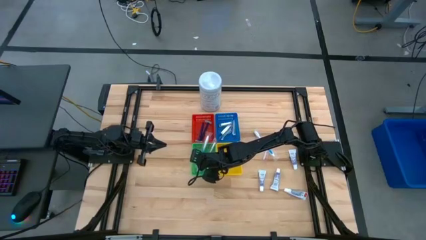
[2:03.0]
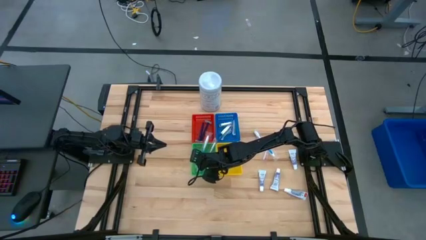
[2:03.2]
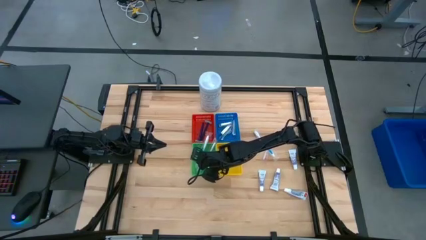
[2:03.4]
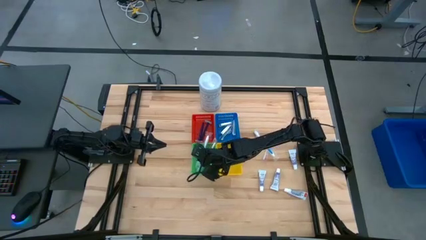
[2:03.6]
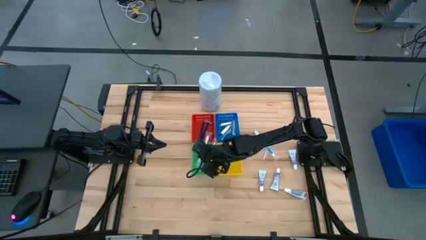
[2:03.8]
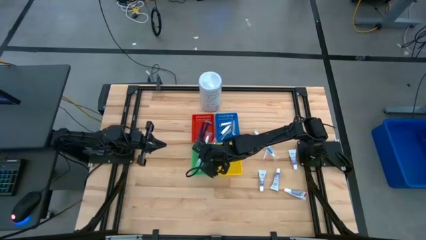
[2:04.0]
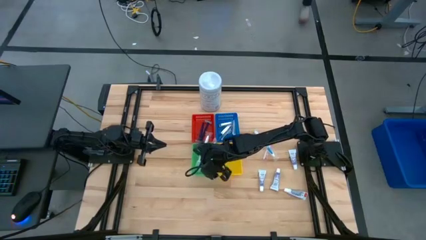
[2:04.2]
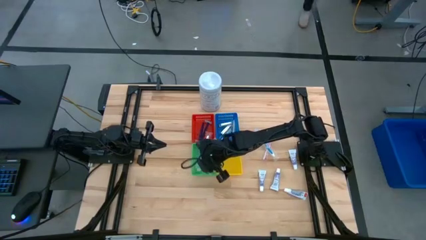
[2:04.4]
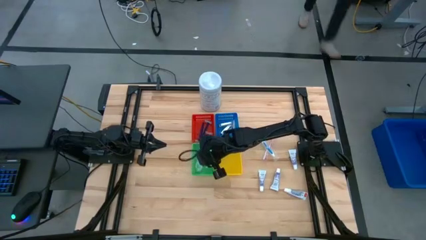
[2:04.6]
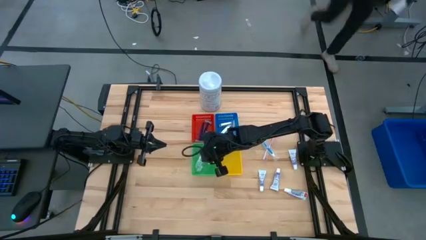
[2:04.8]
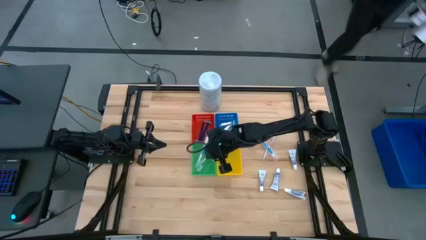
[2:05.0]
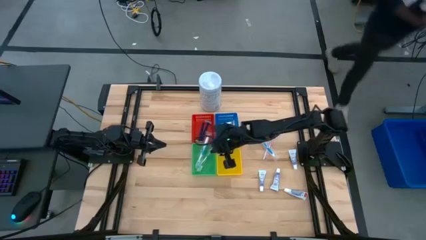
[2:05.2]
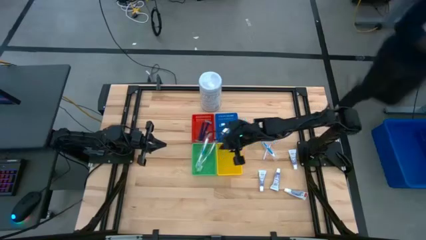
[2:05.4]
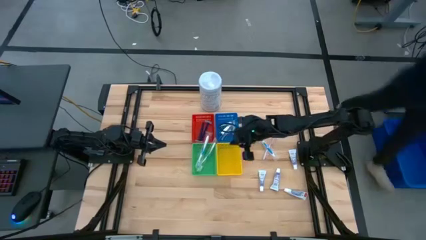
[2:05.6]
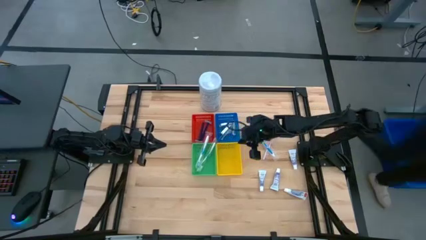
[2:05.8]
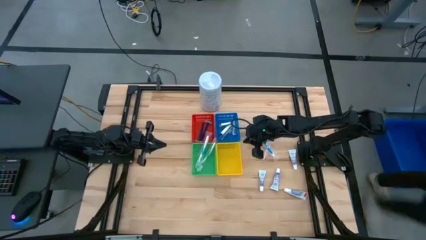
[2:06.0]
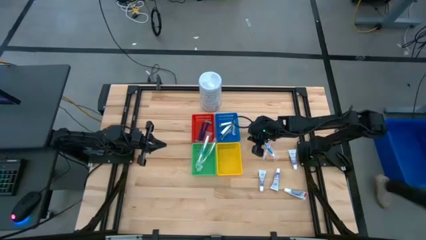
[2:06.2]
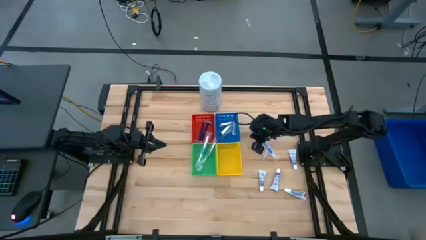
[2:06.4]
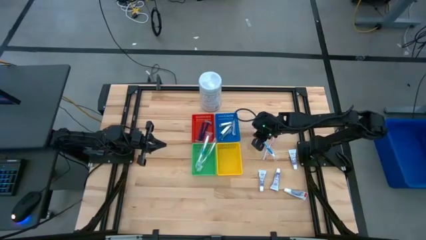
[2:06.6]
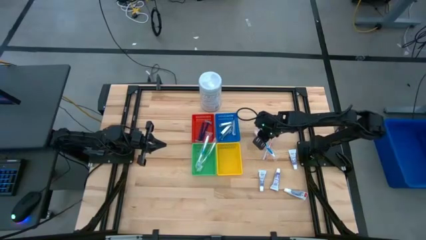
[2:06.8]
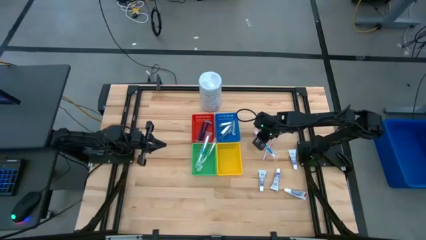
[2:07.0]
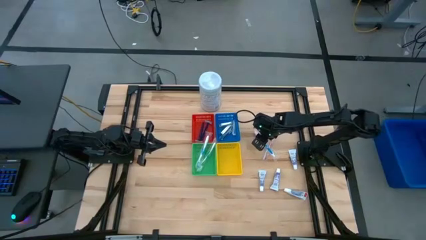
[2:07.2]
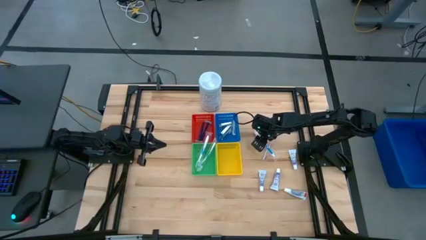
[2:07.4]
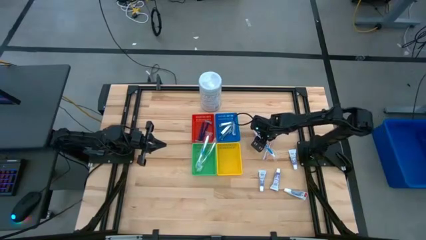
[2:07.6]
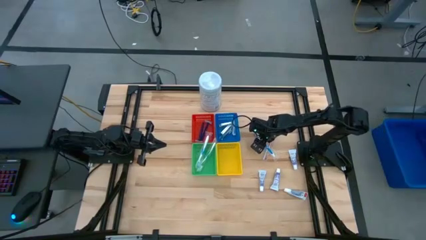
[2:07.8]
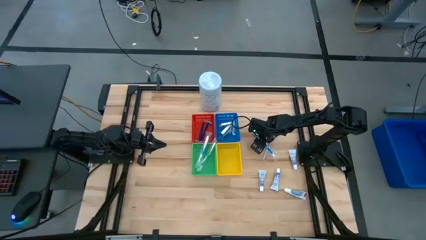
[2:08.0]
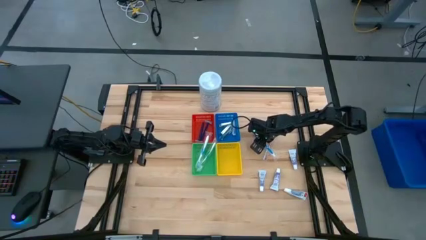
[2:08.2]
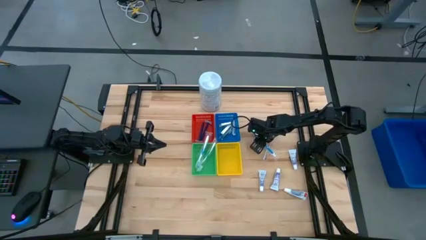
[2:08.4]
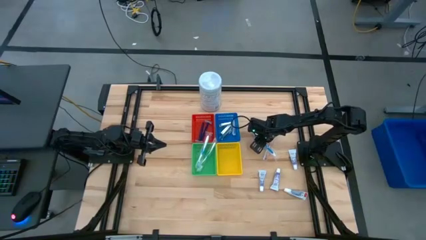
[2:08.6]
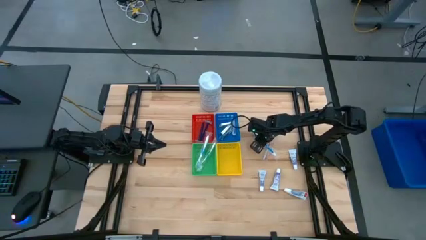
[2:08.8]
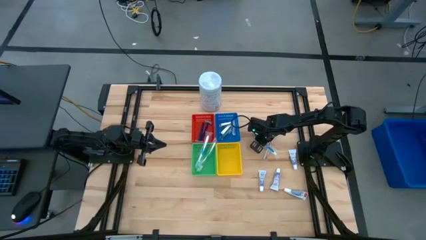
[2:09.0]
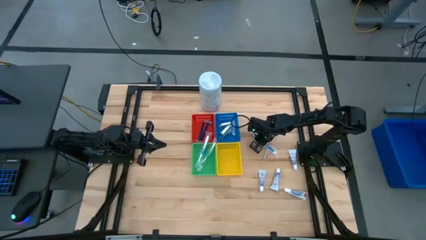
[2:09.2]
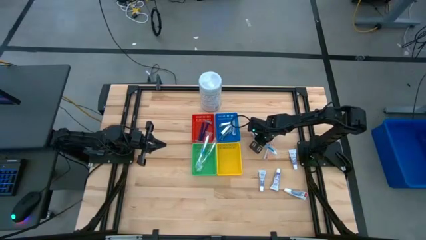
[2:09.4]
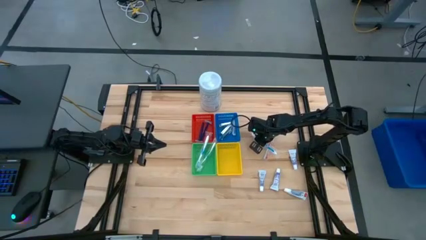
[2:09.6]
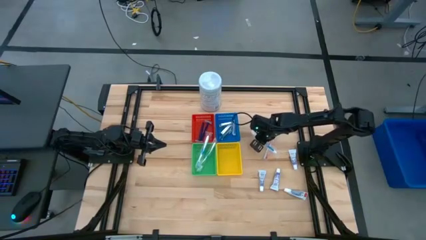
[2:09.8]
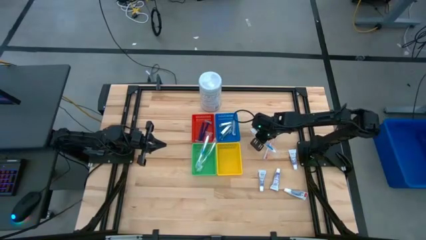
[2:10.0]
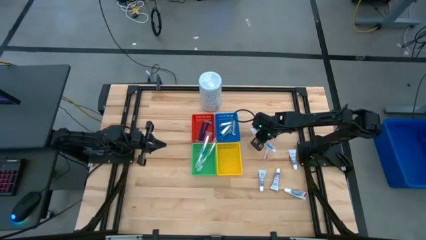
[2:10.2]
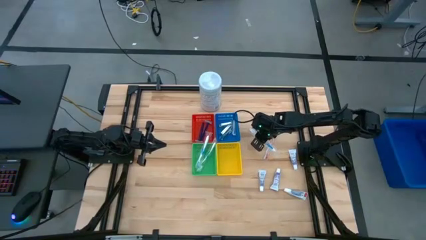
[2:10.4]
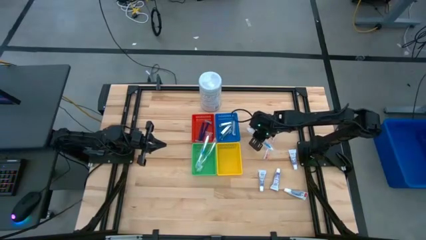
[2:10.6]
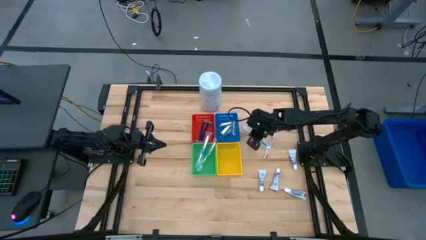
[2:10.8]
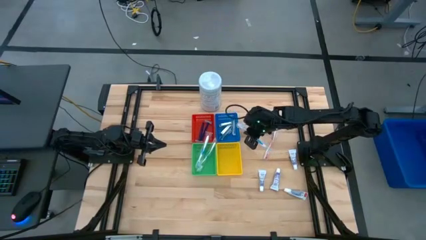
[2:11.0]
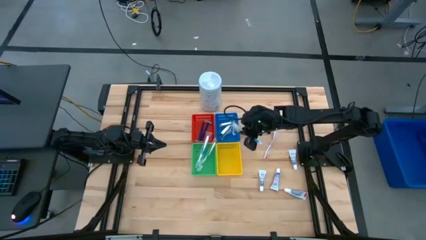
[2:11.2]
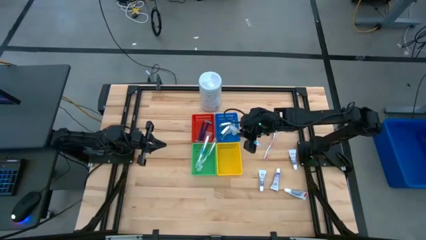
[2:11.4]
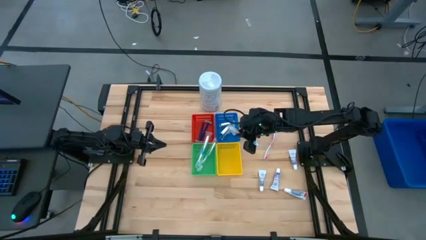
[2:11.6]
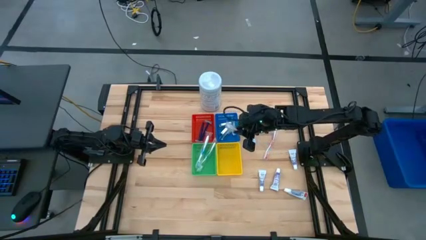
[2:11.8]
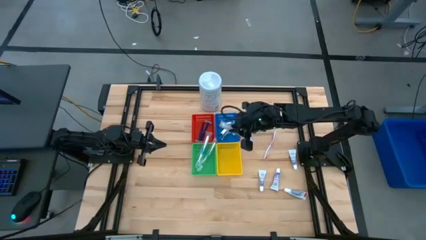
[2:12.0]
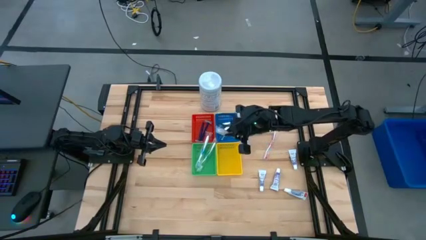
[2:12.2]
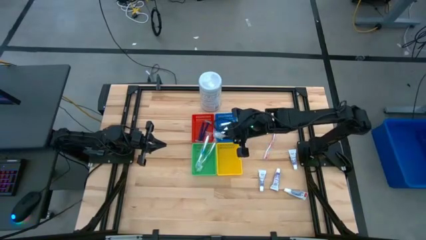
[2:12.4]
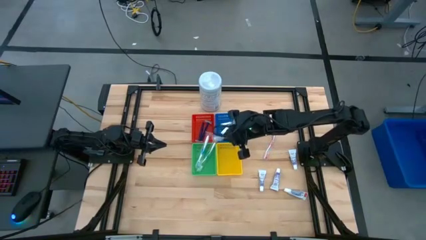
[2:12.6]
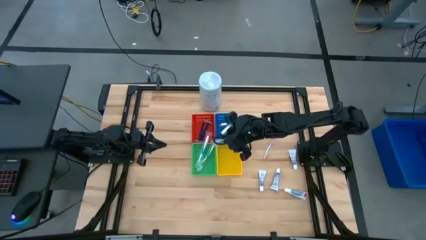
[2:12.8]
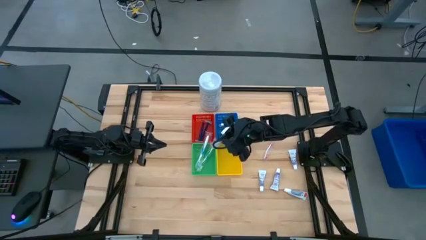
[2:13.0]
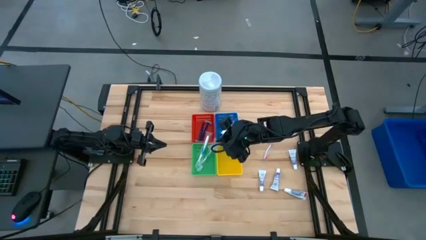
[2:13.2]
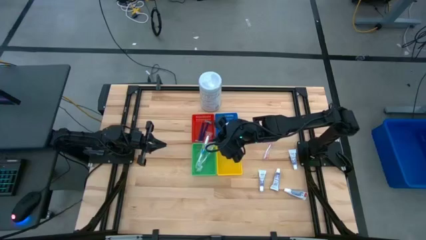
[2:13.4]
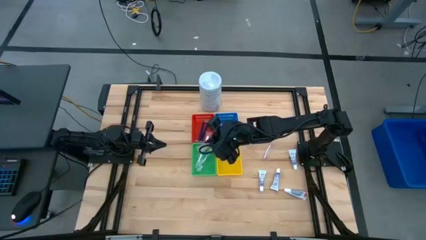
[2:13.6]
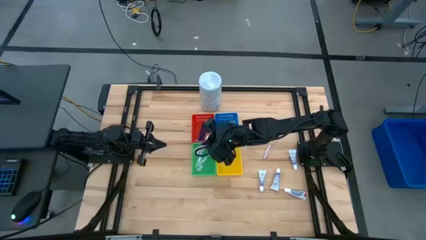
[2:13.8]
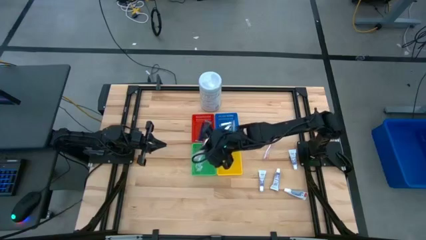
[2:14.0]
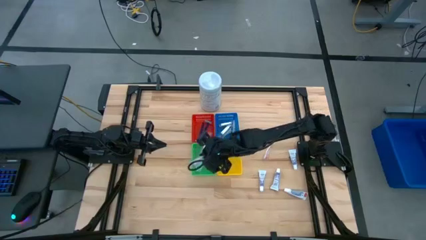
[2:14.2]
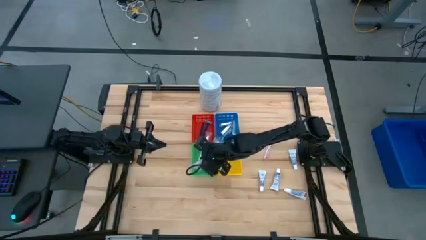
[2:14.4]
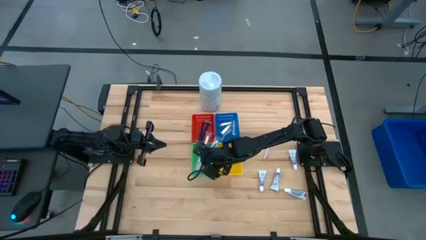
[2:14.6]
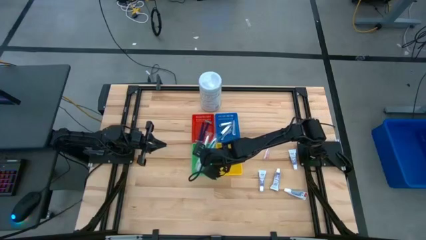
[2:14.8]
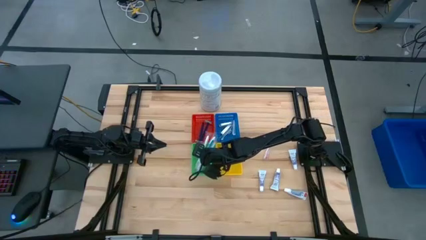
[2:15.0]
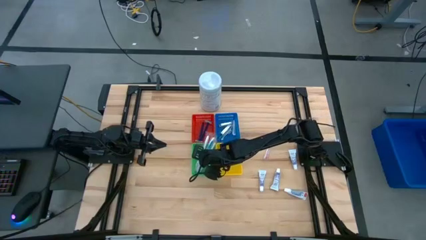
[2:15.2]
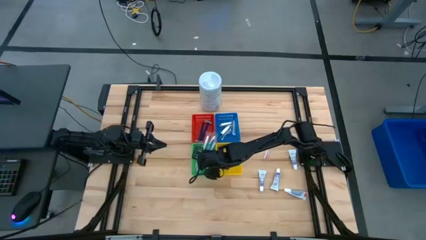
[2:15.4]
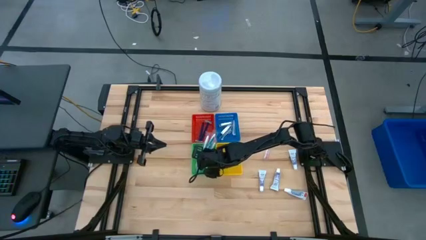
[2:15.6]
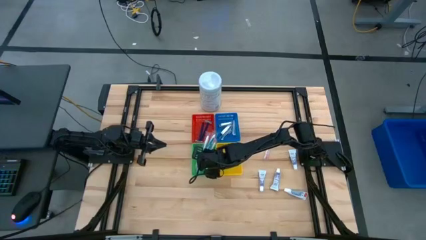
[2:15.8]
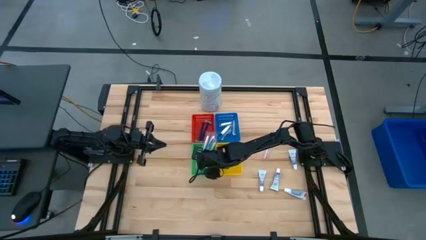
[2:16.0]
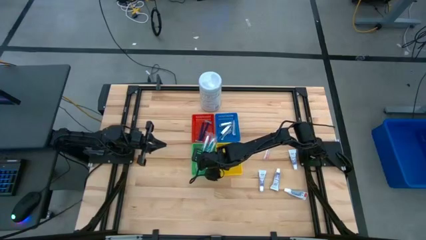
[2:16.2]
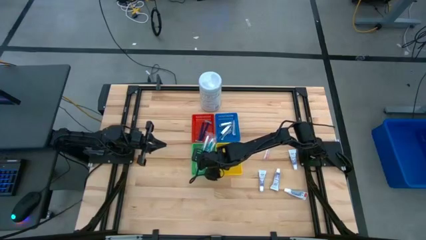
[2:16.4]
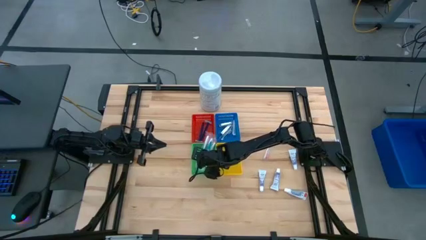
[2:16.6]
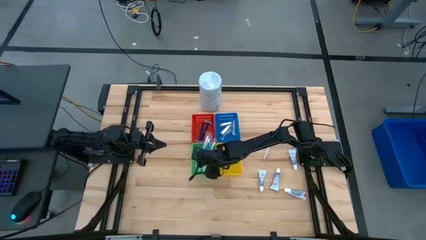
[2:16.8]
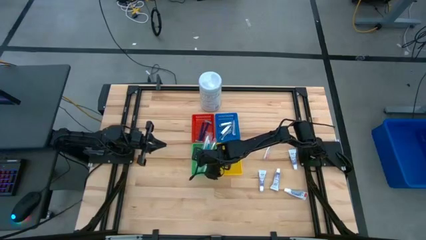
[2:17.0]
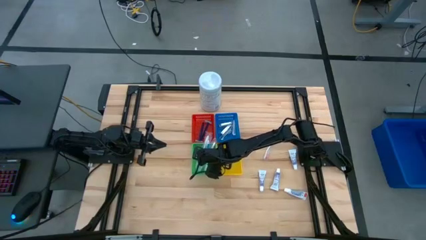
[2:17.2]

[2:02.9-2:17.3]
Task: Pick & Place Travel size toiletries
Put the blue toothbrush into the green bin

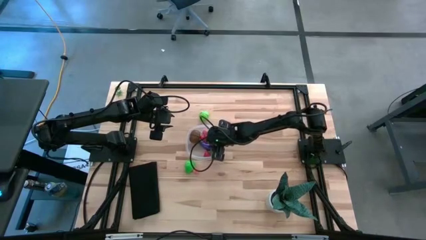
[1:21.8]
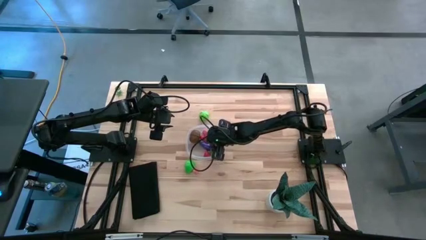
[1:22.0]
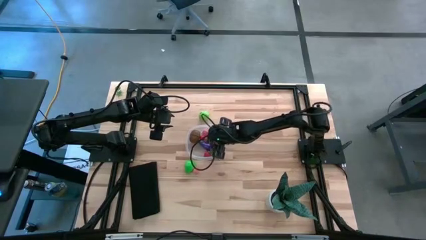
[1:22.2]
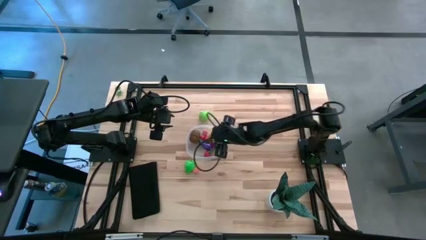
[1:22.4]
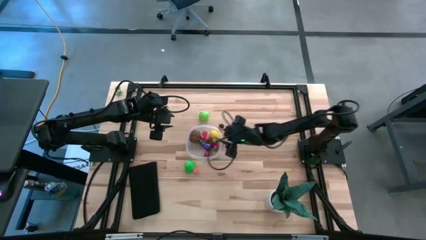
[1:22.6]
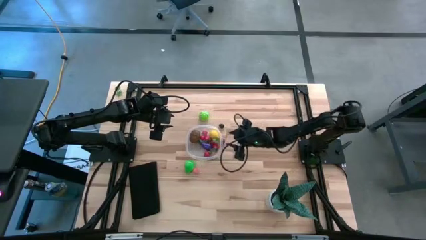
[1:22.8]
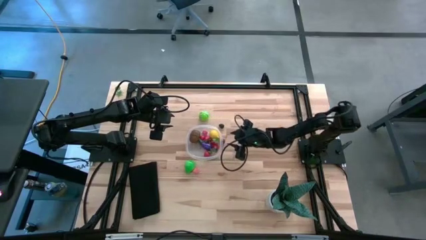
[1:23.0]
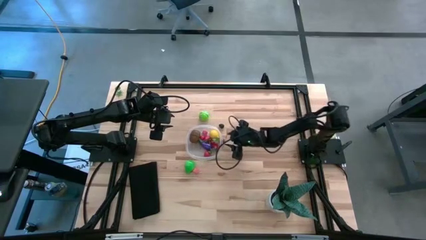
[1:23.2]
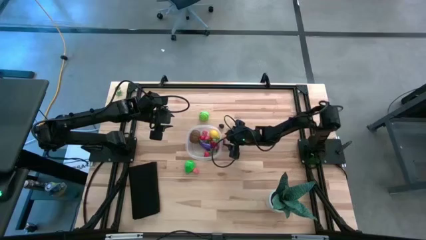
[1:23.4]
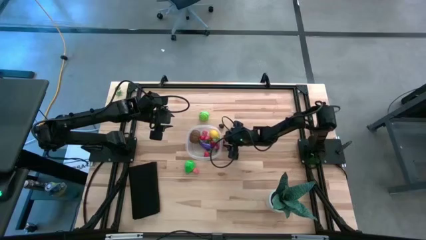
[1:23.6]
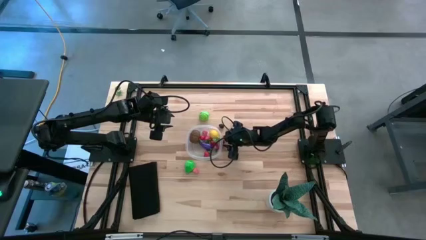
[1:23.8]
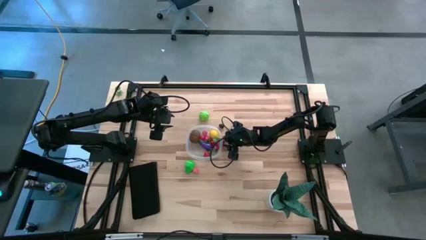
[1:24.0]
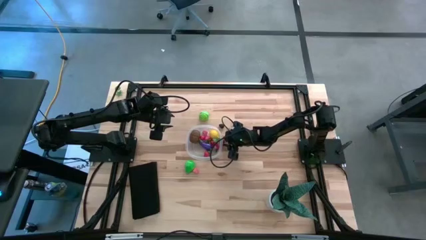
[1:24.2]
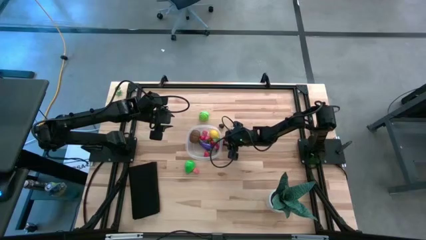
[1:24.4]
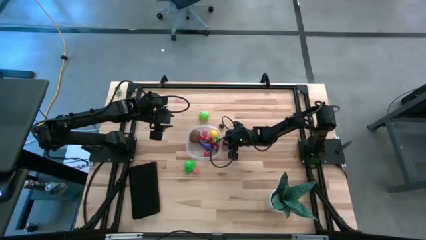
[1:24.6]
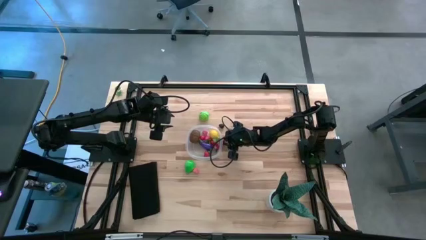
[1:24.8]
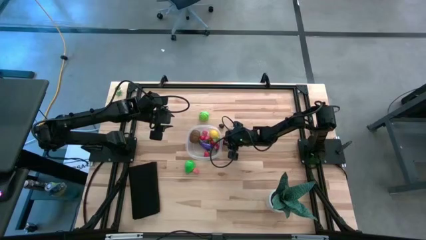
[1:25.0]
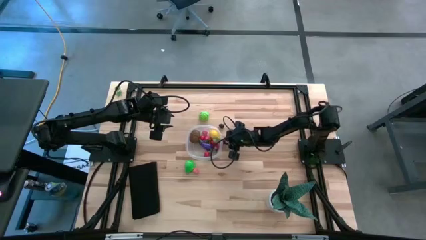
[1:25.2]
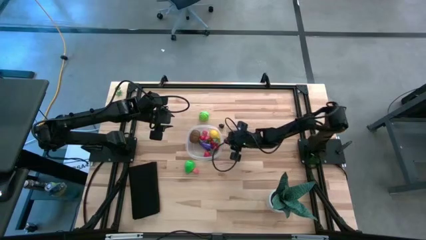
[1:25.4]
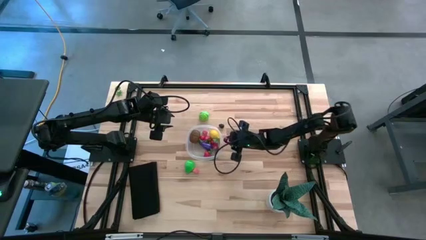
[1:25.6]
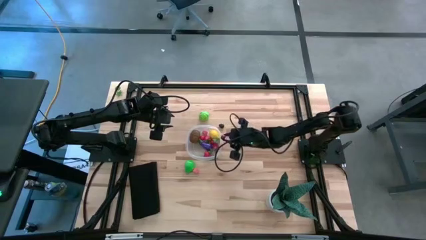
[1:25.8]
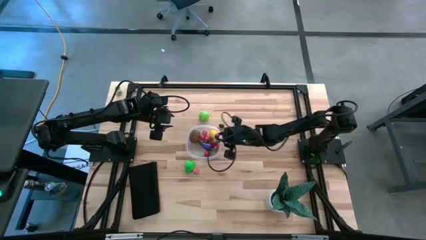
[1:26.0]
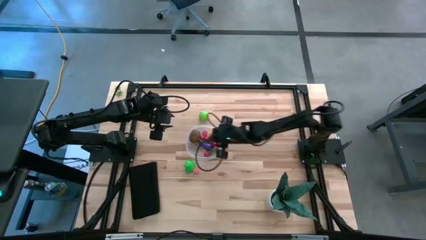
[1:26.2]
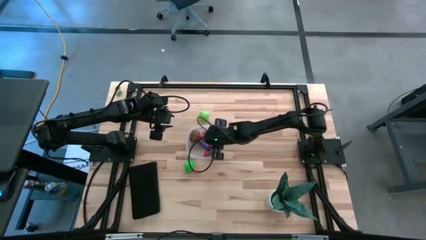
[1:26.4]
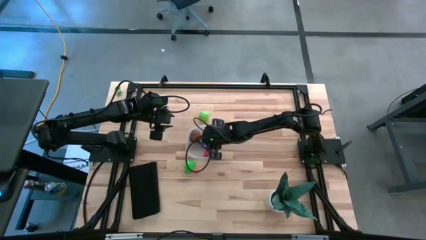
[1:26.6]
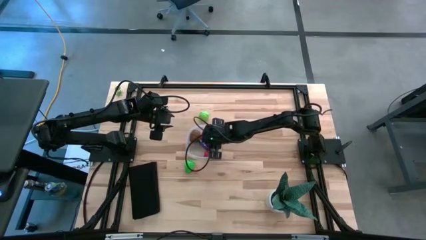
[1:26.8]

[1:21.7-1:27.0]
Task: Pick and placing Produce into tupperware
Put the cherry into the transparent bin
